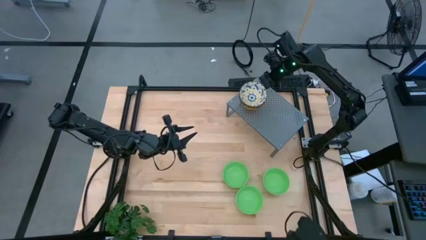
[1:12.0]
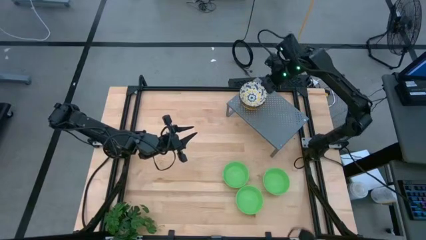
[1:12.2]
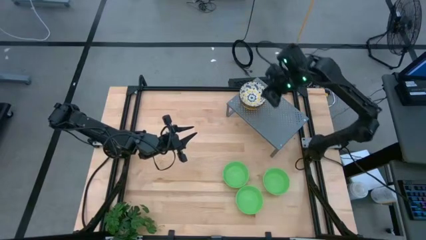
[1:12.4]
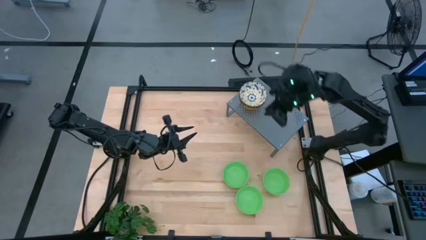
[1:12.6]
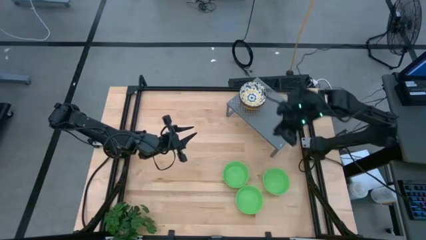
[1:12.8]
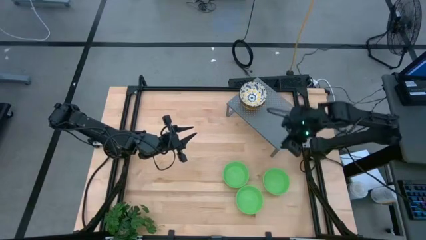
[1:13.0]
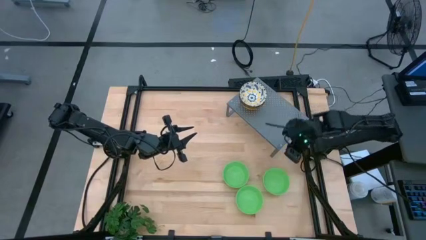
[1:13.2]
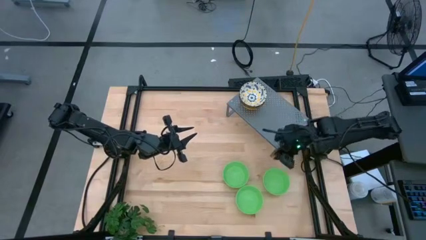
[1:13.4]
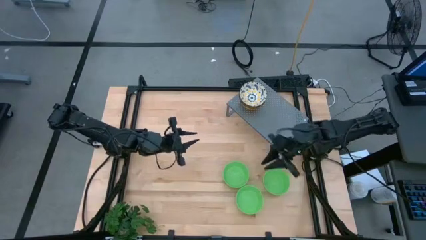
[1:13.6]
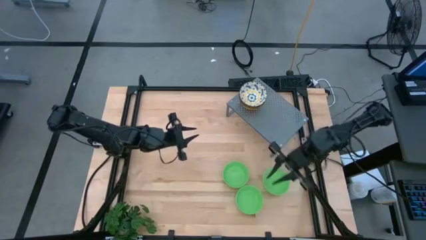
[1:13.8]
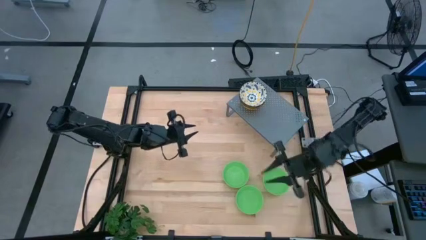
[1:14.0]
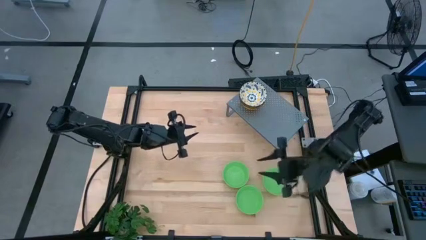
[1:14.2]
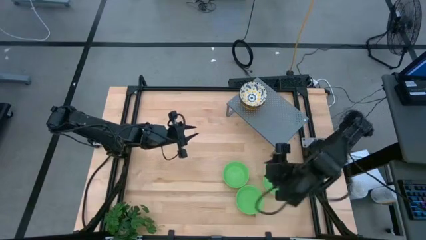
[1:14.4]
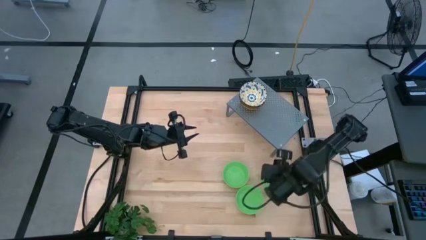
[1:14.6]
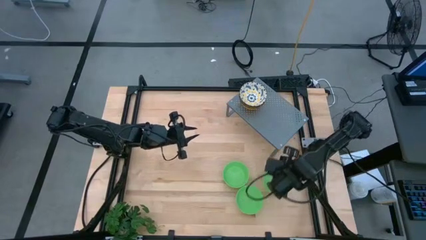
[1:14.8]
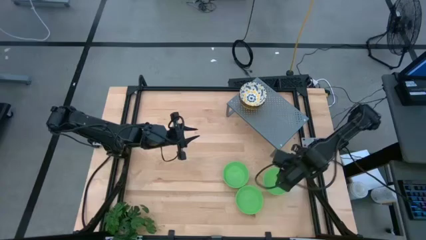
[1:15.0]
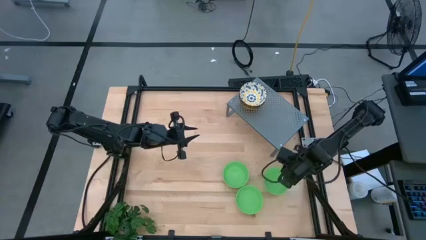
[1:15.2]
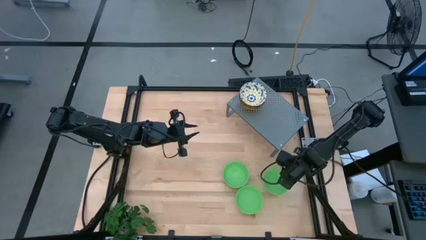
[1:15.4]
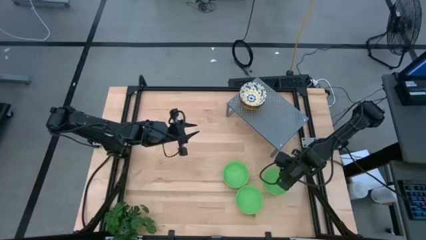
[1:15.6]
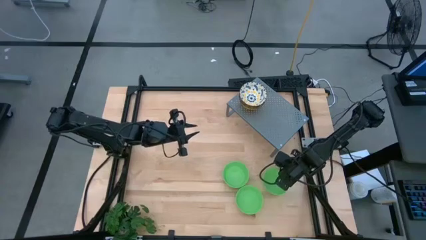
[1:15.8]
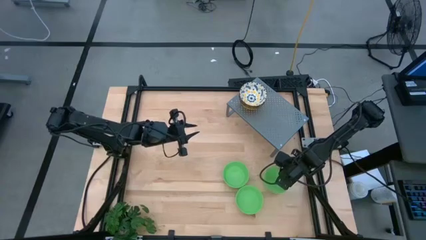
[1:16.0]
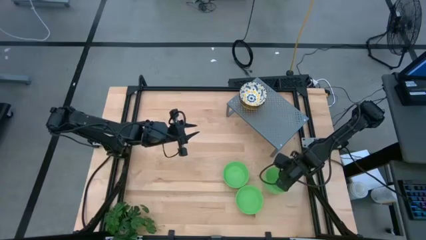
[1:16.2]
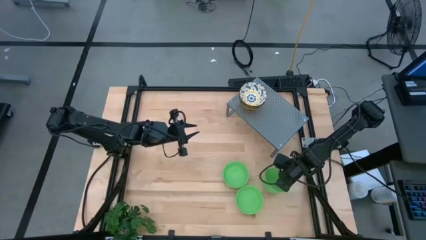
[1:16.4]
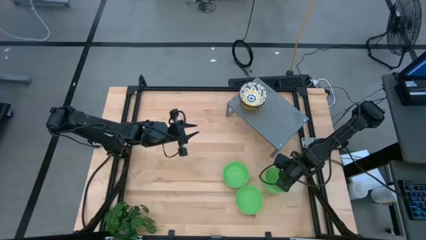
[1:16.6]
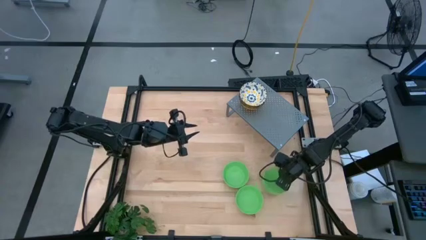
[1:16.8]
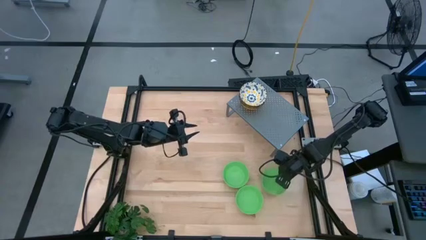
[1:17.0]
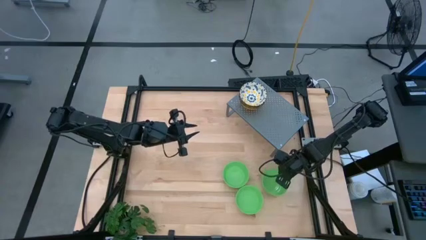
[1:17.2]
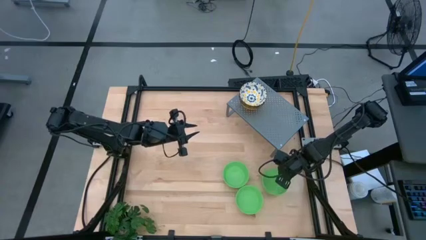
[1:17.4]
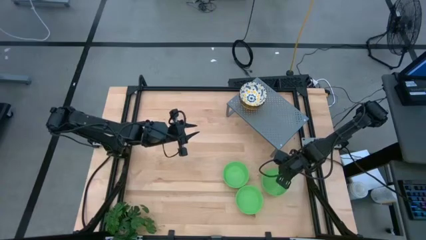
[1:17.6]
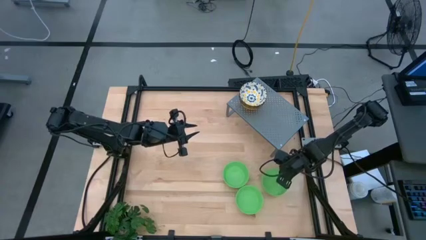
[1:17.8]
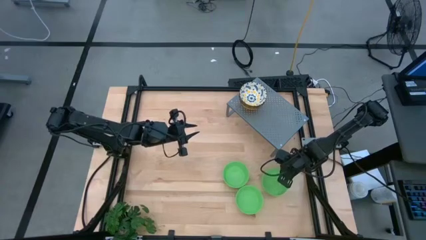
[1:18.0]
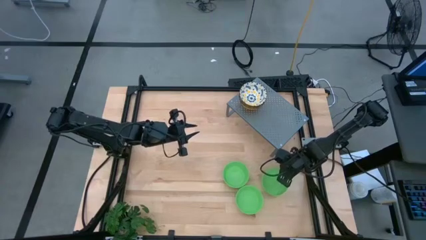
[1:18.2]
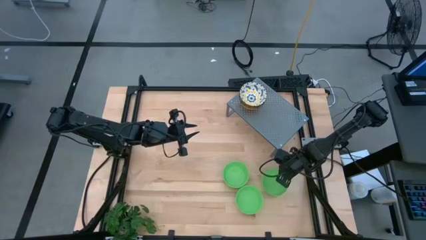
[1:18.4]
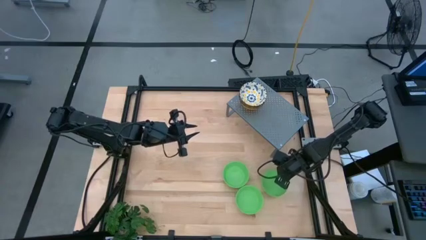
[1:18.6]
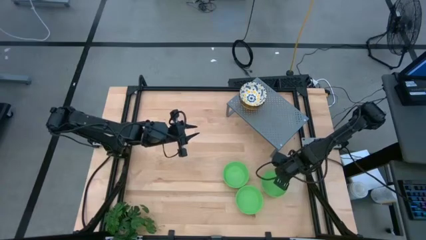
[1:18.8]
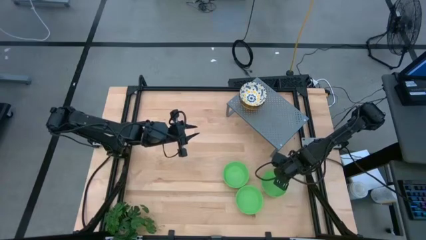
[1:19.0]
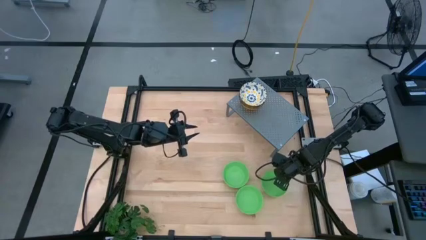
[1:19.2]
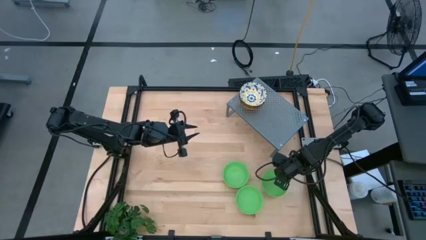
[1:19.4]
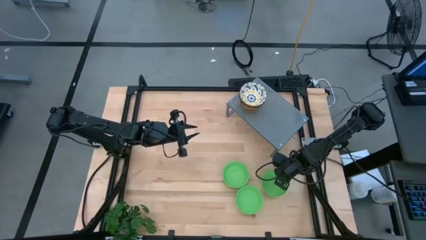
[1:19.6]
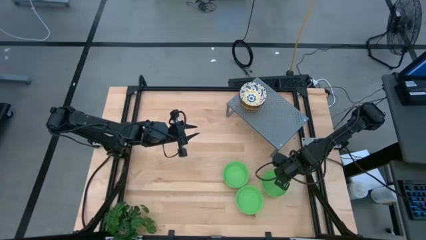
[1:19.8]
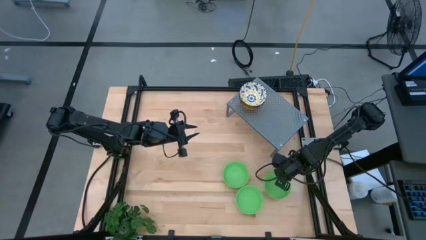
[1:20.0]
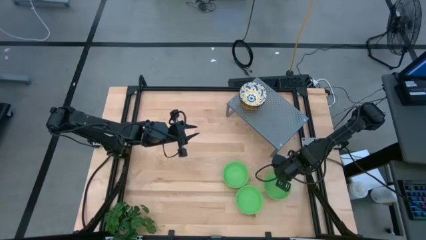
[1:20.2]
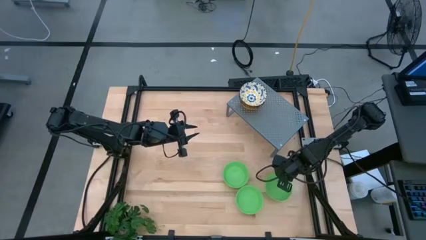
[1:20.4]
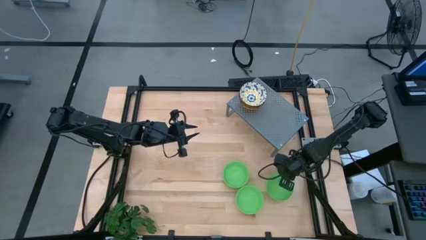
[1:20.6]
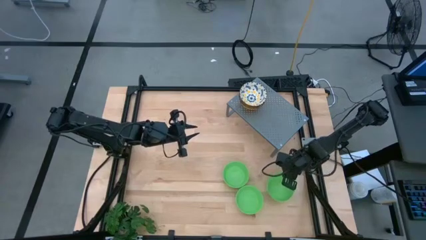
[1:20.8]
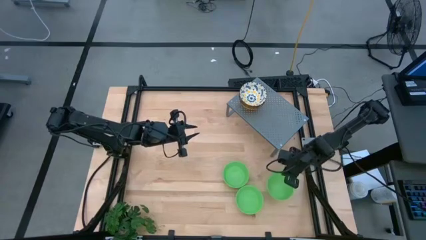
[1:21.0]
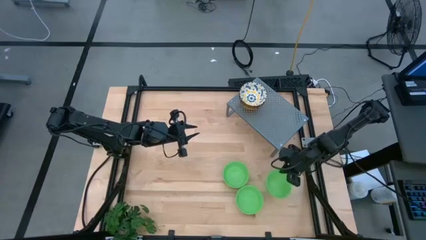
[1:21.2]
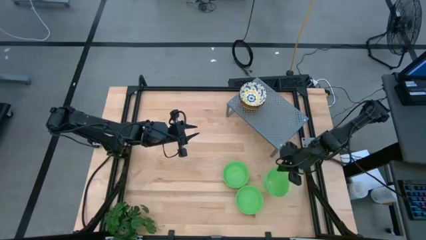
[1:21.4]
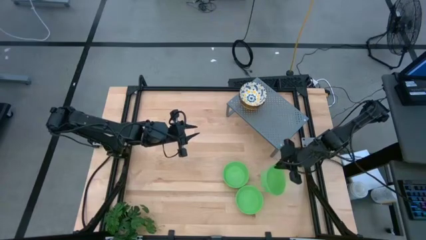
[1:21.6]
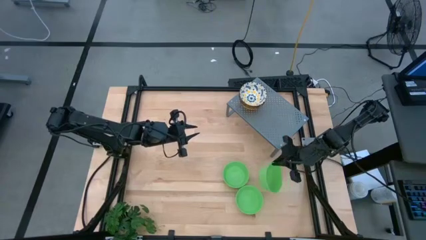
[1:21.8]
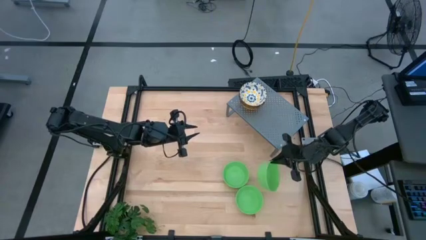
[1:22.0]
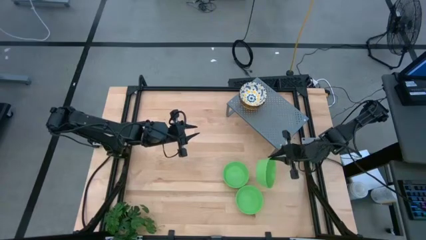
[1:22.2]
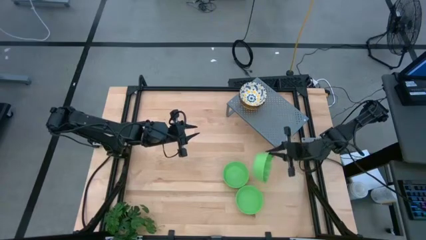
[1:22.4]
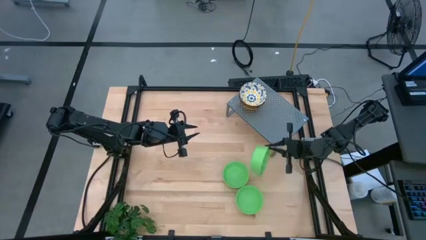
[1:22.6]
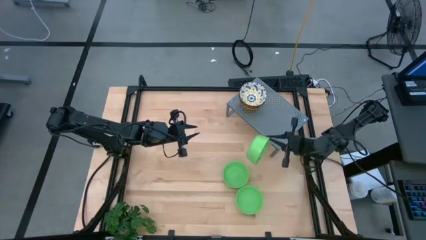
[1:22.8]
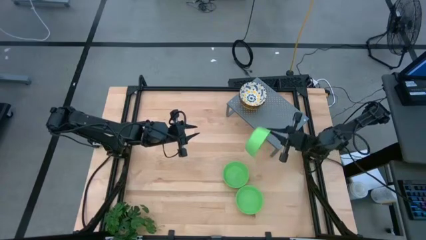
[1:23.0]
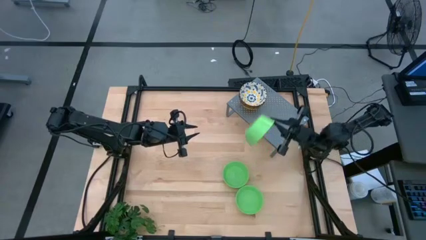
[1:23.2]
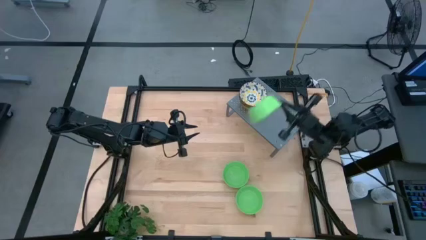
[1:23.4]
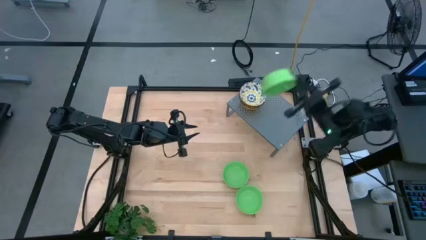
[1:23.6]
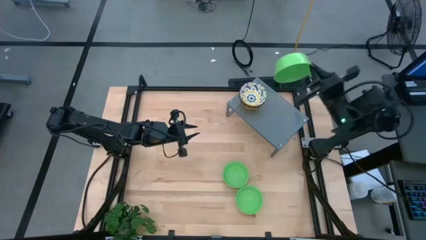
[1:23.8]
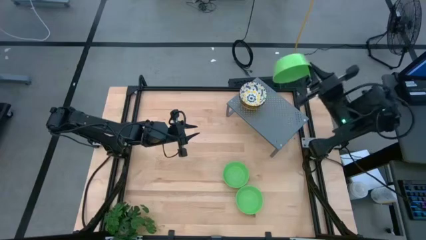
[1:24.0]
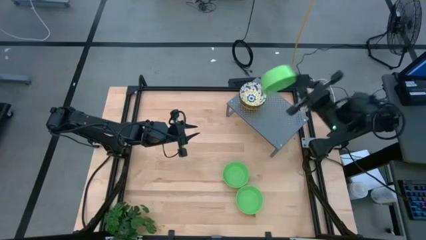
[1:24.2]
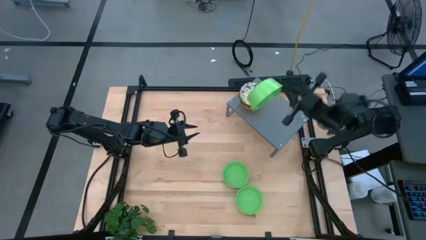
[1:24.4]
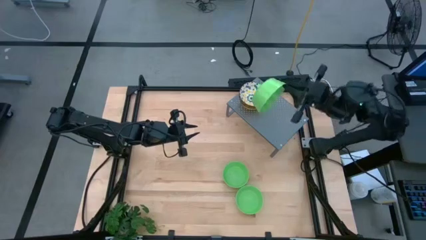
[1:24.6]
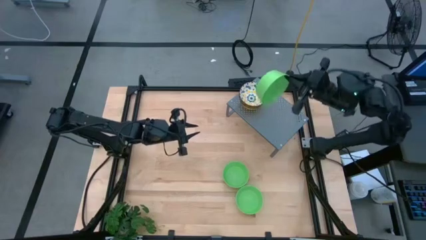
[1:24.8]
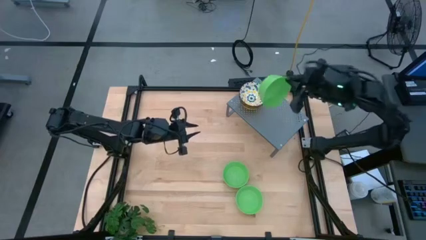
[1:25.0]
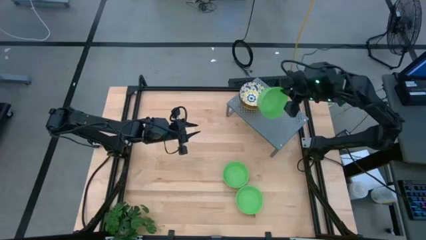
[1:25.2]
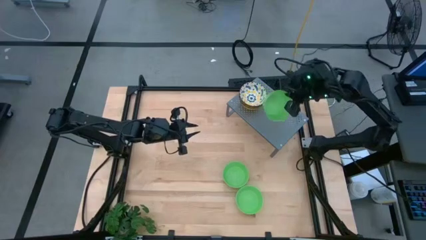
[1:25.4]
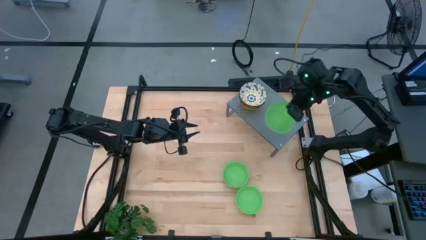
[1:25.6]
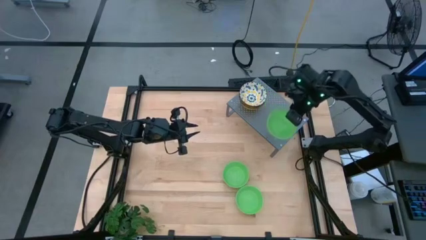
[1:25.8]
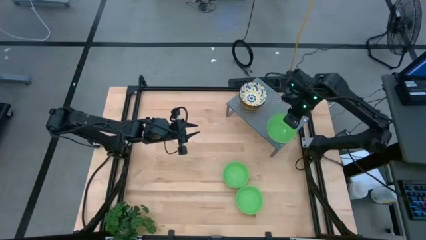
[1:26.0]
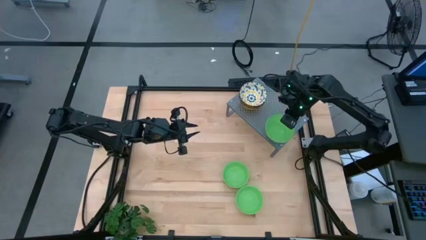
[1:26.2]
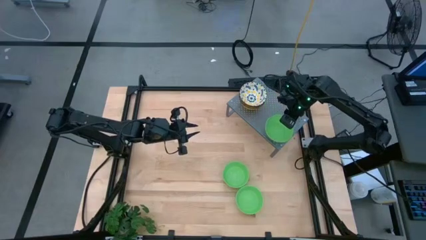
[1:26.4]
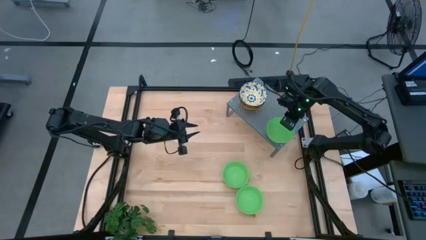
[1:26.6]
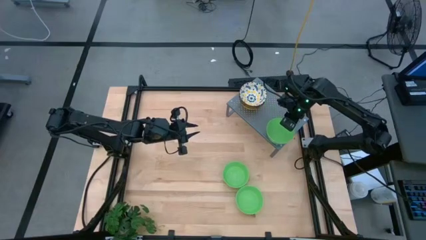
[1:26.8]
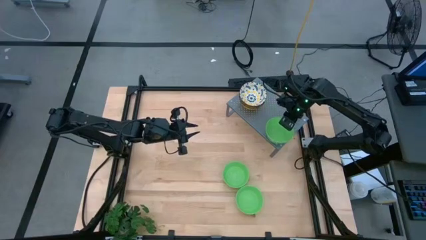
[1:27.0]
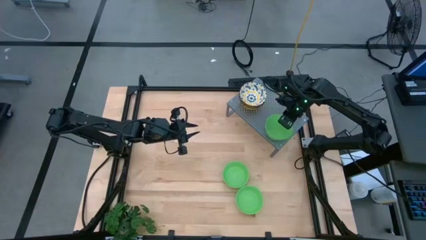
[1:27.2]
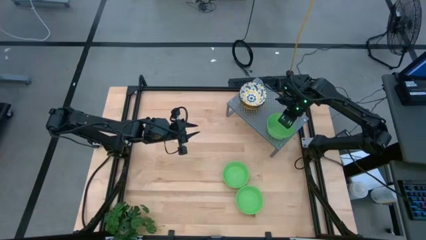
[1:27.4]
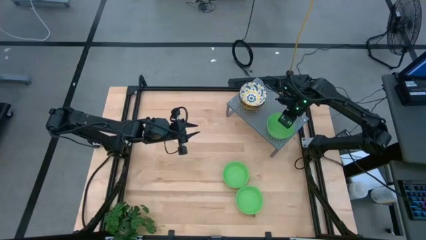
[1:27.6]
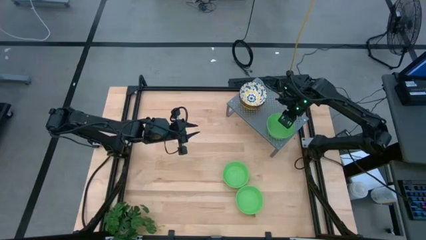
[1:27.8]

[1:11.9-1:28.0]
Task: Pick & Place Mini bowls
Put the right green bowl on the shelf

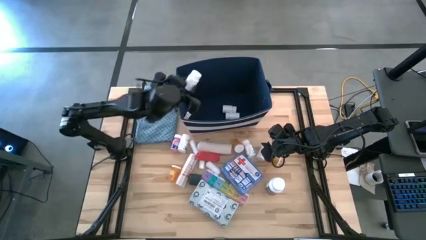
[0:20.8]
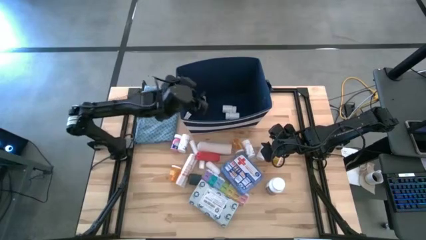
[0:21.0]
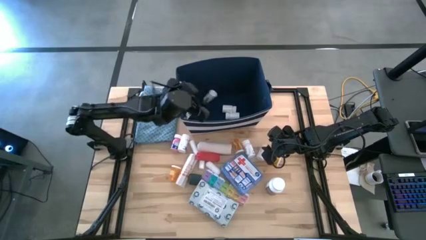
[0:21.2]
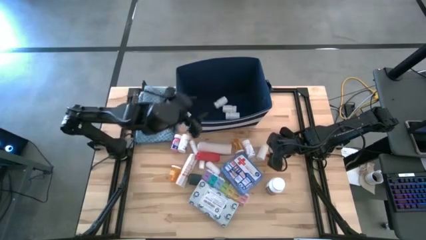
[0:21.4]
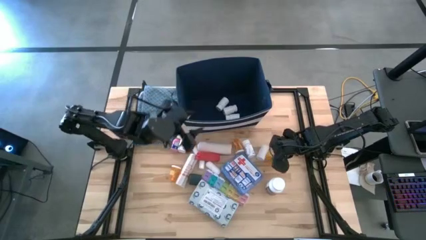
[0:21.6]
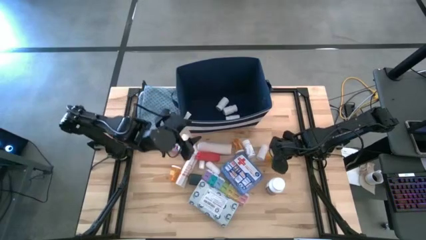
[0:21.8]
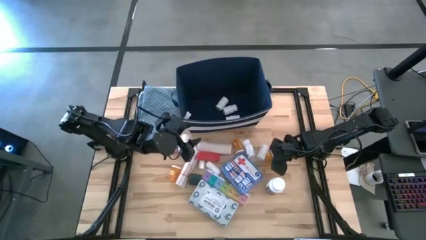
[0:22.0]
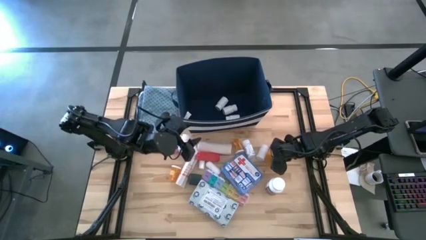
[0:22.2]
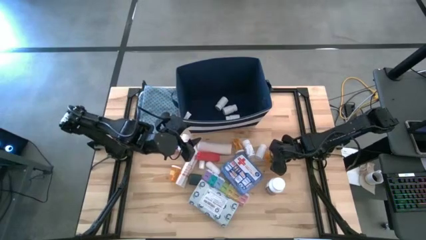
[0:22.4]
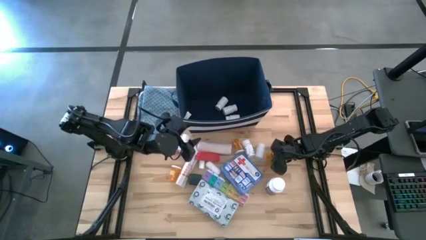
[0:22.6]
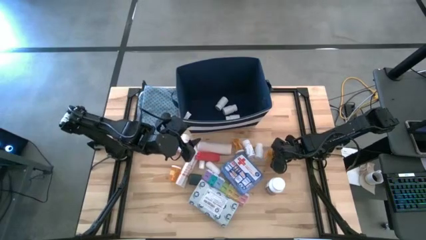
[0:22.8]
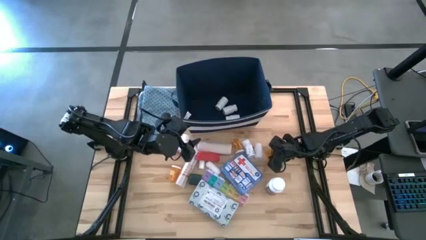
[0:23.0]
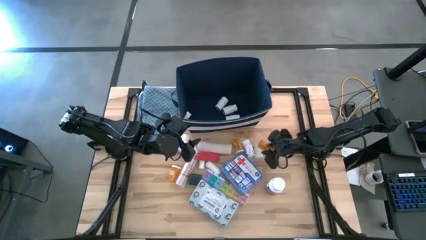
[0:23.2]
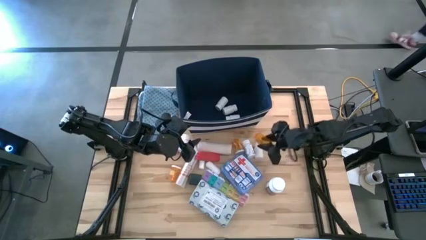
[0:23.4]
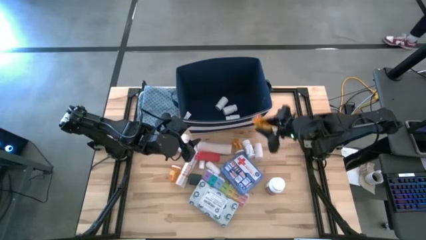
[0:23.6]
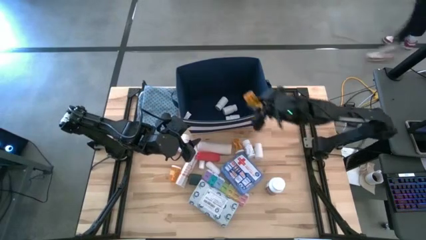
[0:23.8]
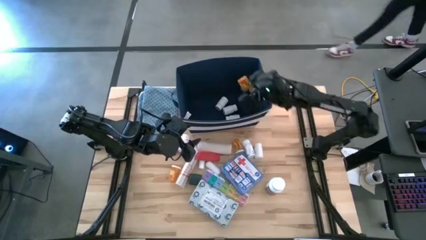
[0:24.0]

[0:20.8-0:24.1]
Task: Pick & place medical supplies in basket/bin
Put the orange pill bottle into the blue bin
